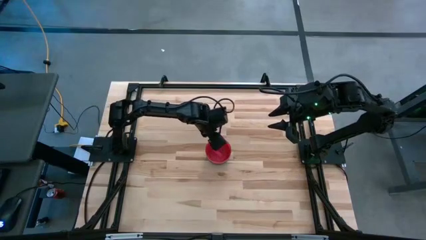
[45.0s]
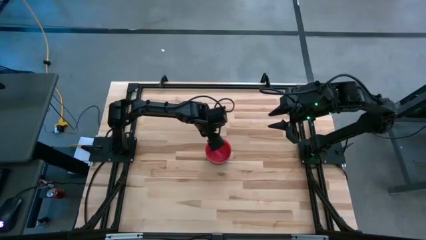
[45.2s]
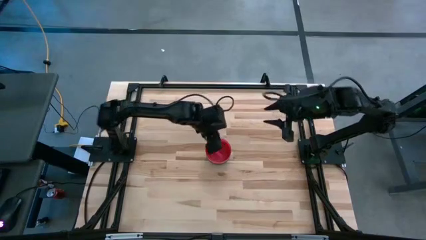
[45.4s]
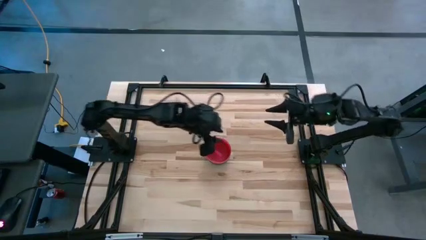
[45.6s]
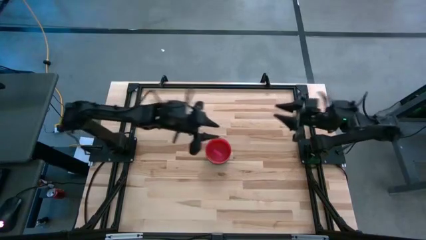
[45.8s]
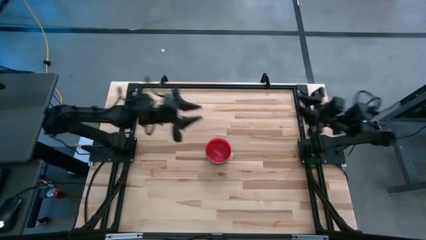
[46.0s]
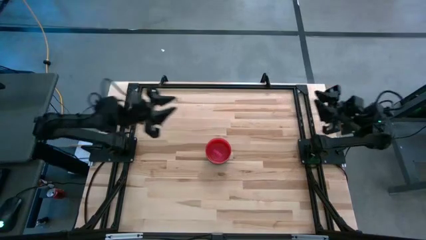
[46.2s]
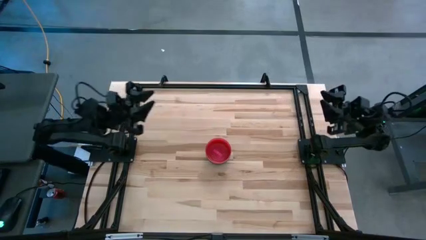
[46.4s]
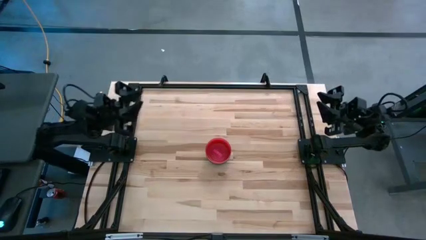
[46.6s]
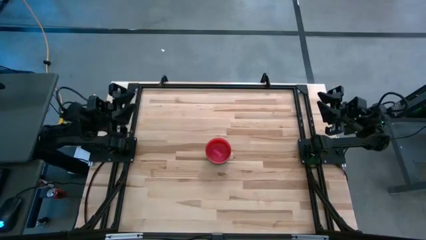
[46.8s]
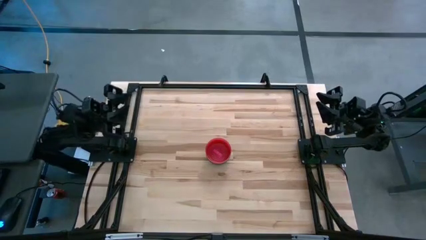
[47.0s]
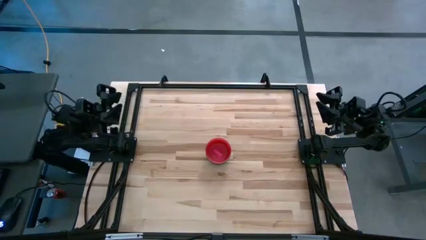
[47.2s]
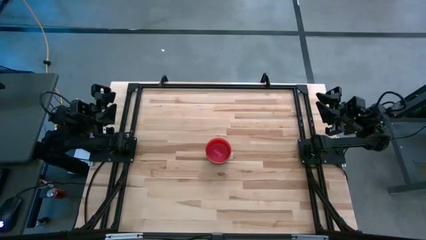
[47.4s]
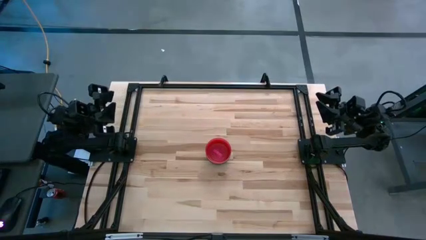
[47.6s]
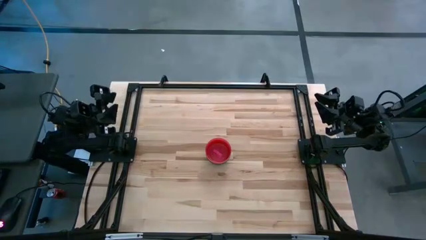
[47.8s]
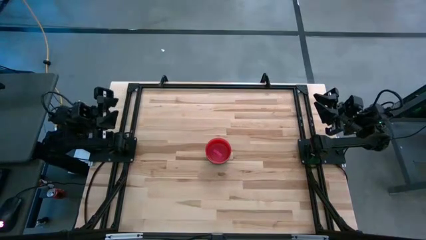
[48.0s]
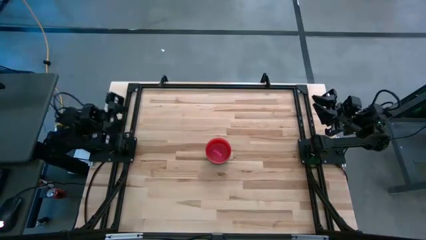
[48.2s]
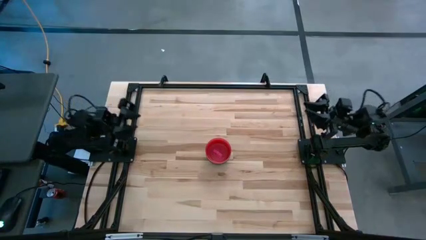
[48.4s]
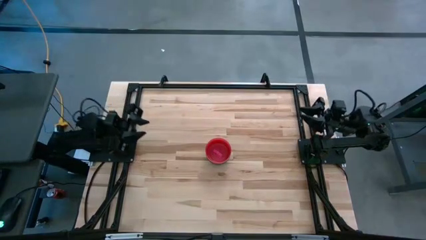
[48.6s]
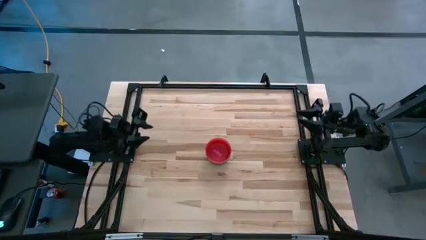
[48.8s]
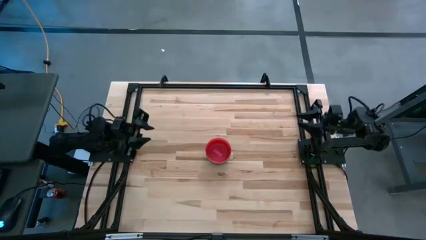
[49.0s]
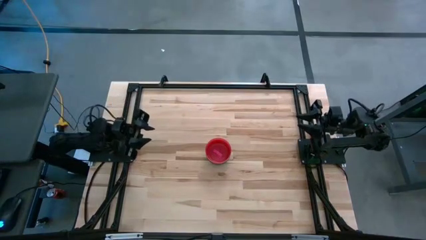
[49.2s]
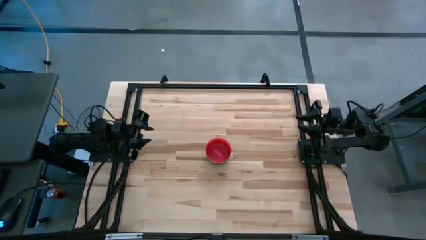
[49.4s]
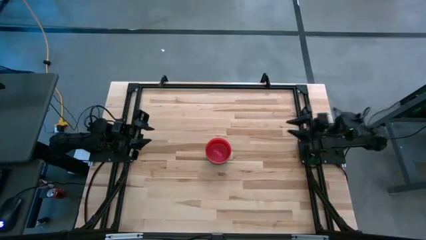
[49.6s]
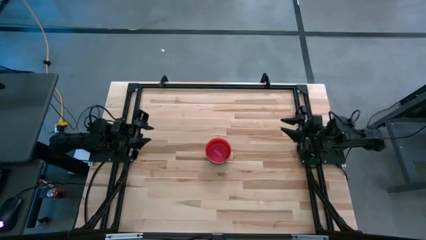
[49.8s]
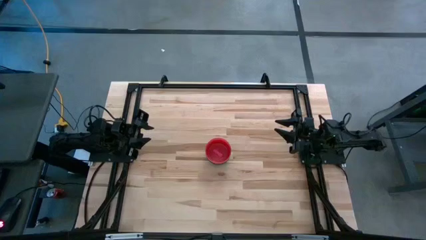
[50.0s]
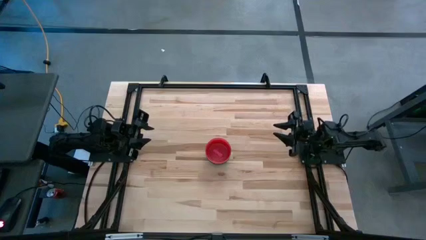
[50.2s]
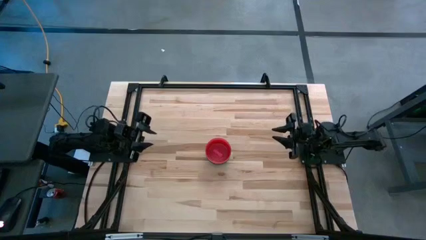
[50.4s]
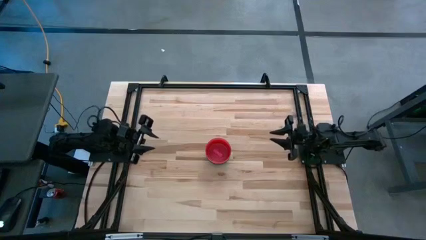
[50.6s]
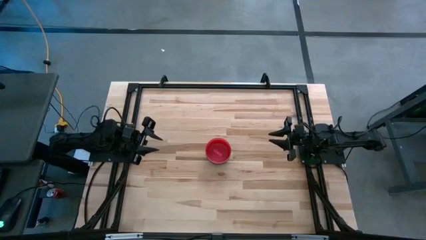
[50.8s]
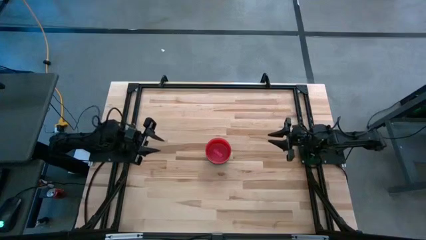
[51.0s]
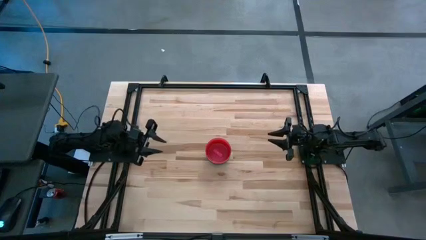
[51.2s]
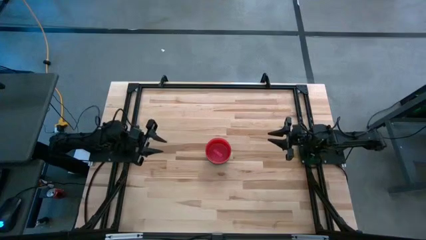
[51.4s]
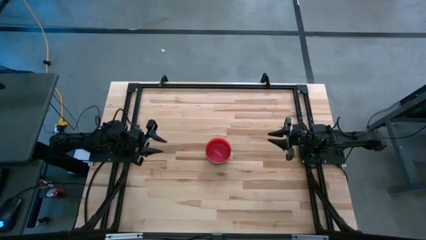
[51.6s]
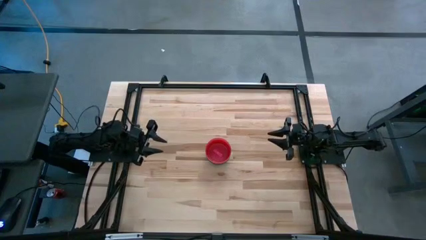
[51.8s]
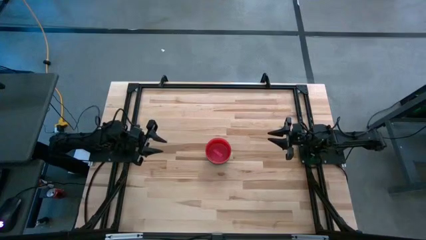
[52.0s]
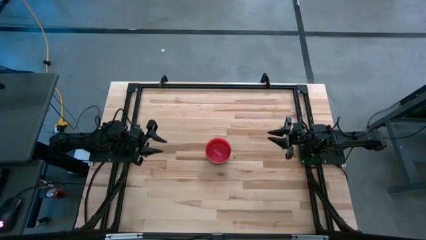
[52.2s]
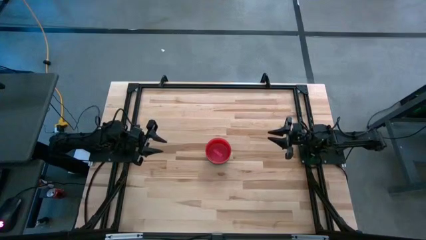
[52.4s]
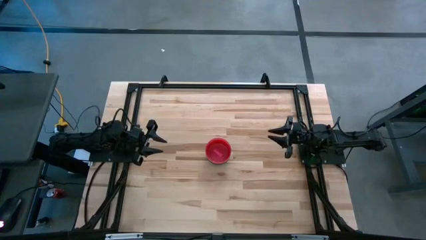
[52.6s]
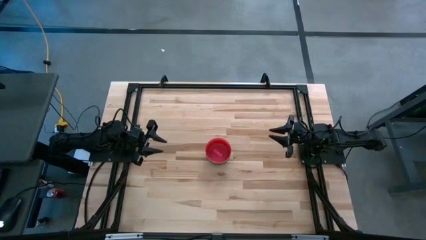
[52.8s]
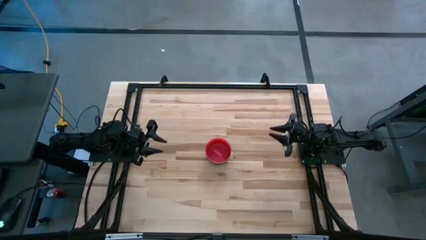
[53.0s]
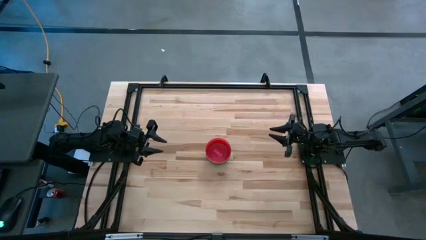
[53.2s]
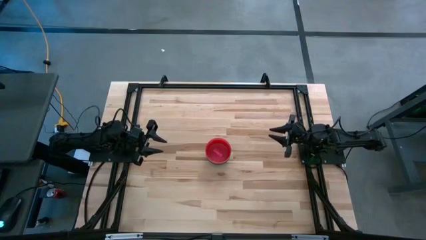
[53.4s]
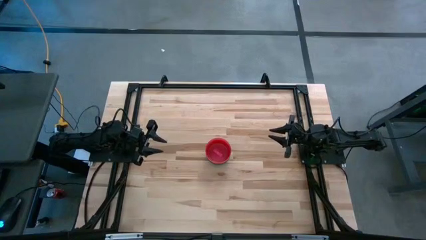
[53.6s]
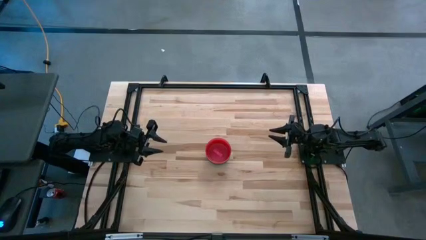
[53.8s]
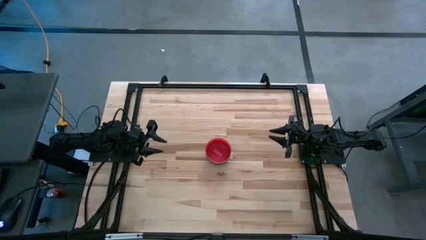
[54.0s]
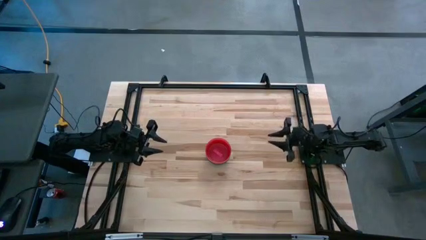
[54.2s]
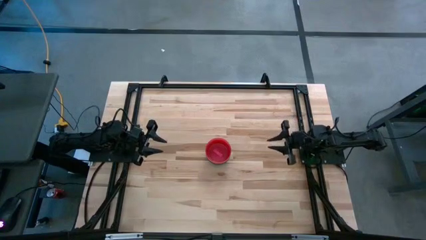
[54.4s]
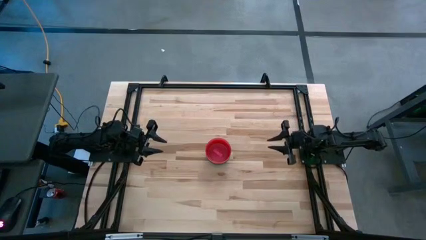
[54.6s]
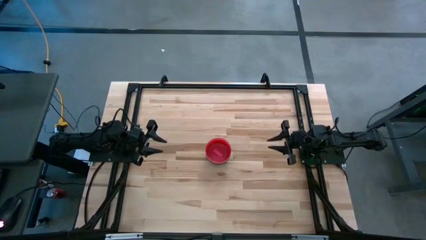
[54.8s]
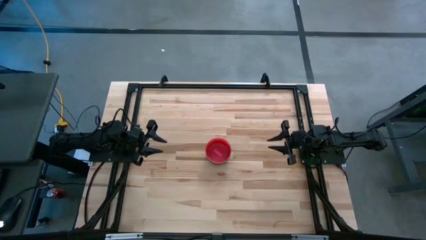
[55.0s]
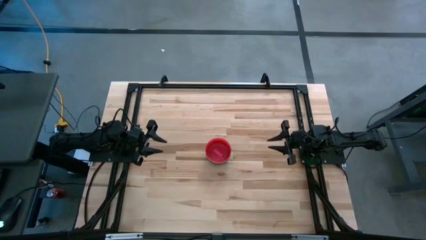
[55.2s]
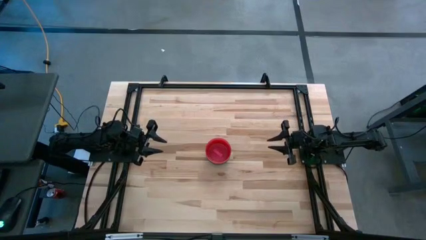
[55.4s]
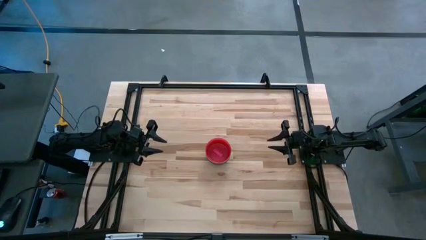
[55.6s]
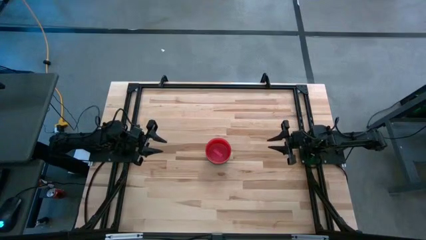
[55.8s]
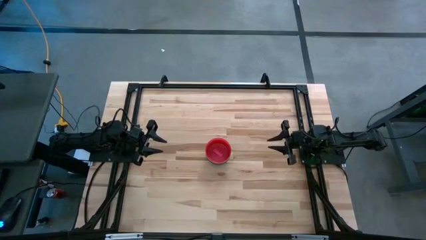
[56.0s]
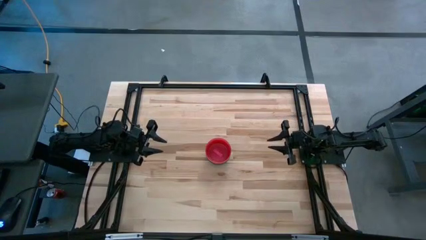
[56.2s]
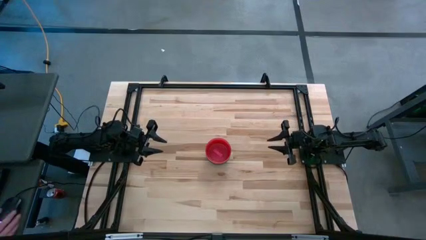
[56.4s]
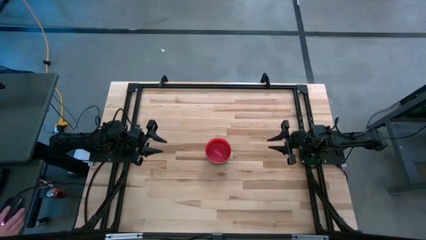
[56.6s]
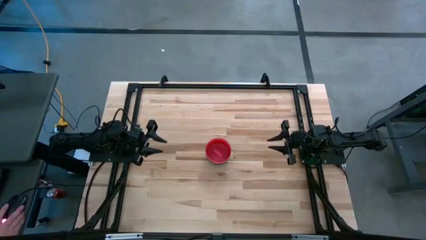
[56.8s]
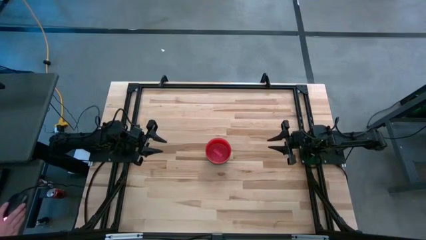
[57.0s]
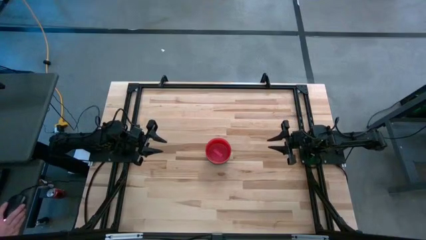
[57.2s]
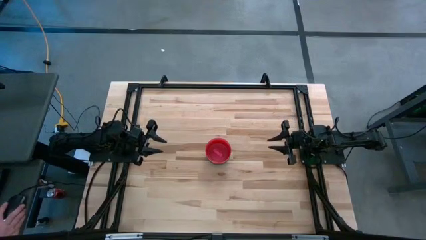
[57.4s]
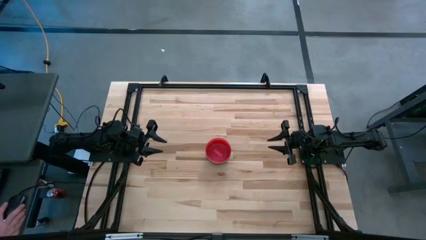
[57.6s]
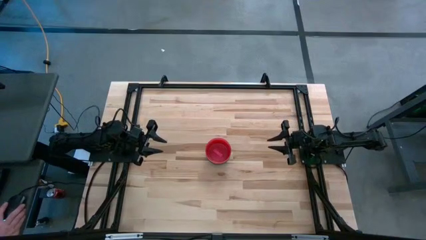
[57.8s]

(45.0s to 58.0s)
Task: Nest bowls inside each other
Return to Home Position

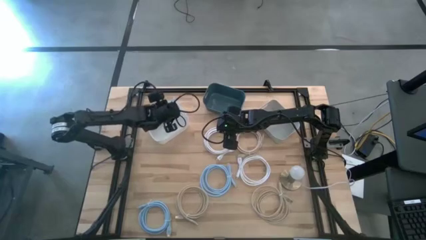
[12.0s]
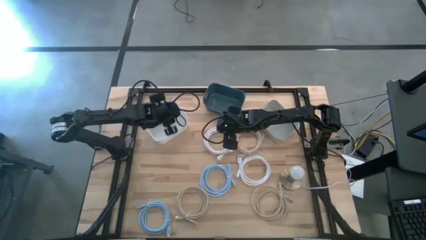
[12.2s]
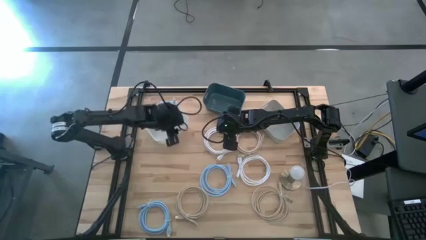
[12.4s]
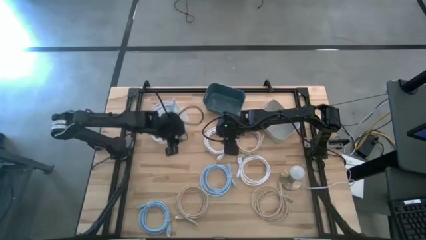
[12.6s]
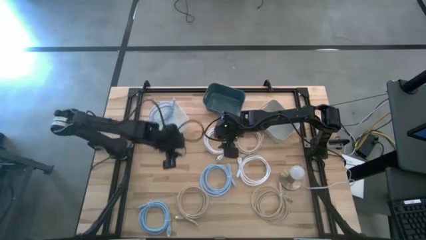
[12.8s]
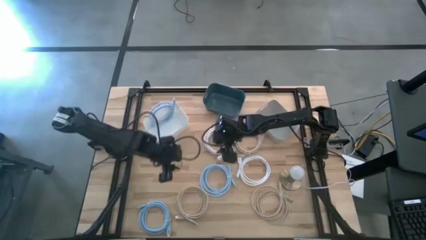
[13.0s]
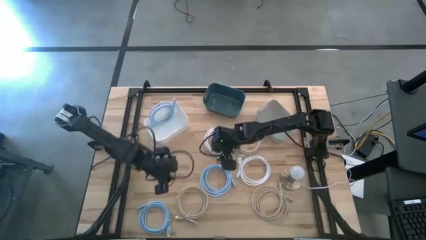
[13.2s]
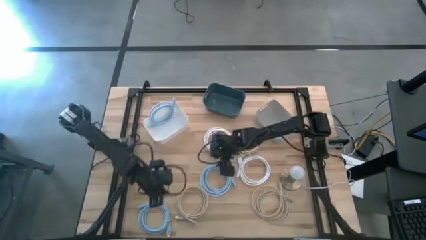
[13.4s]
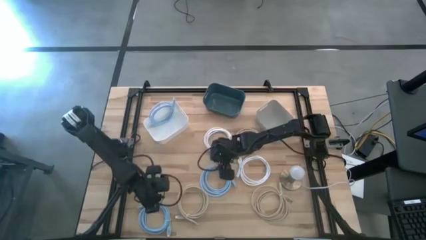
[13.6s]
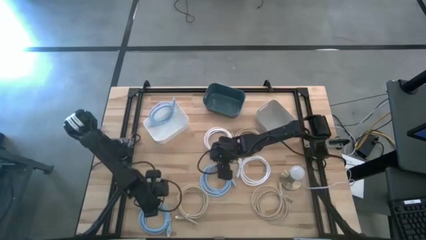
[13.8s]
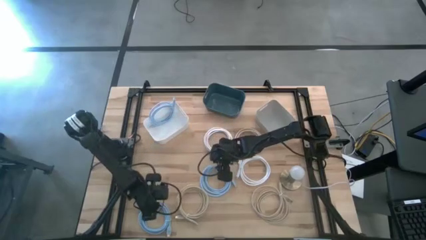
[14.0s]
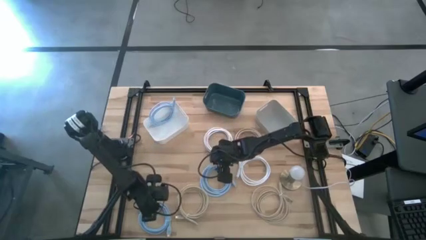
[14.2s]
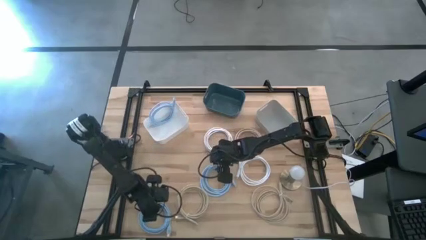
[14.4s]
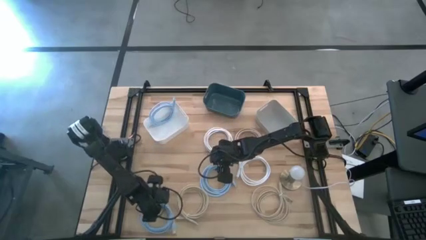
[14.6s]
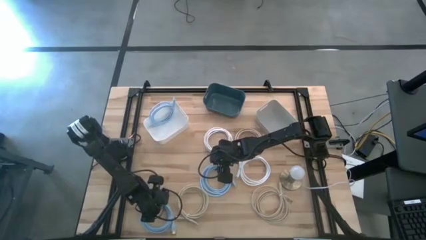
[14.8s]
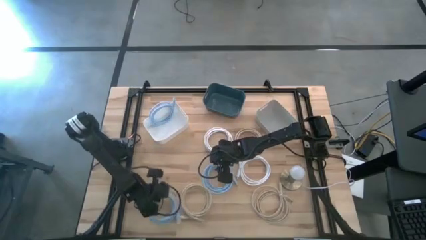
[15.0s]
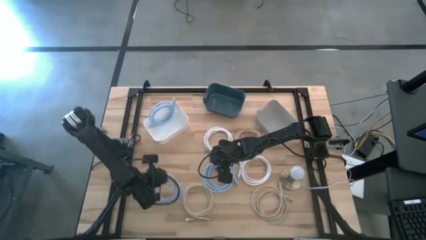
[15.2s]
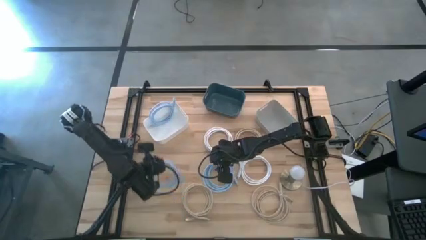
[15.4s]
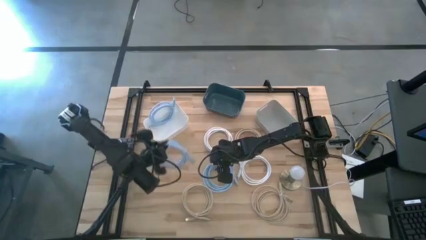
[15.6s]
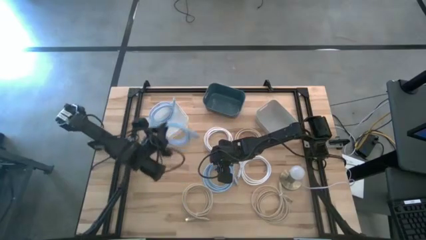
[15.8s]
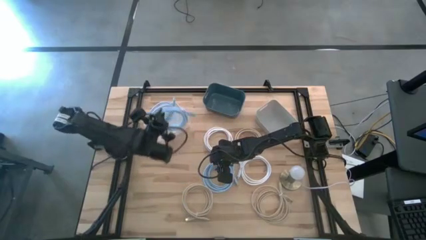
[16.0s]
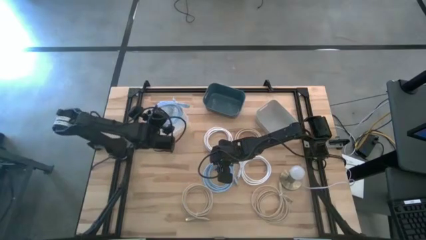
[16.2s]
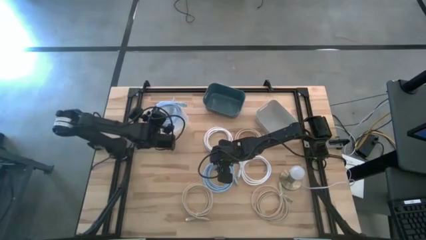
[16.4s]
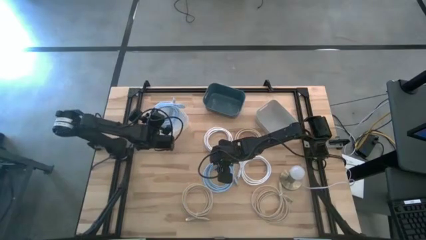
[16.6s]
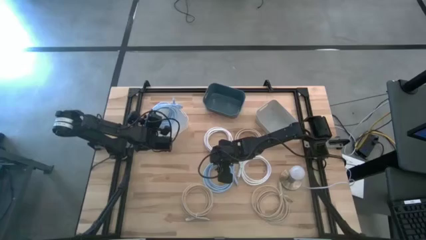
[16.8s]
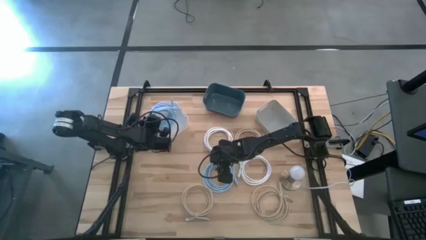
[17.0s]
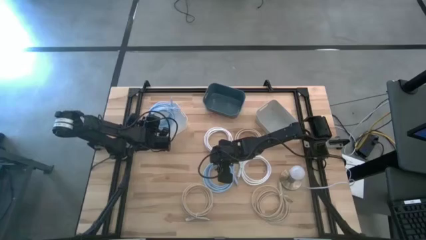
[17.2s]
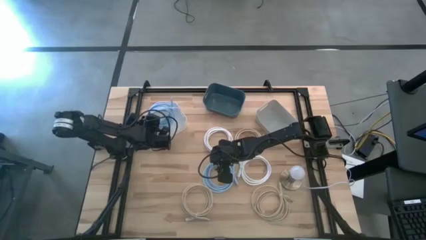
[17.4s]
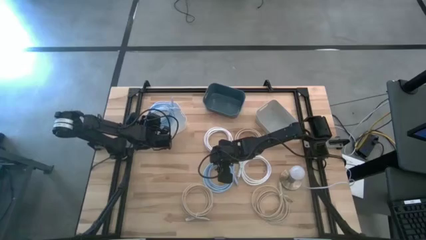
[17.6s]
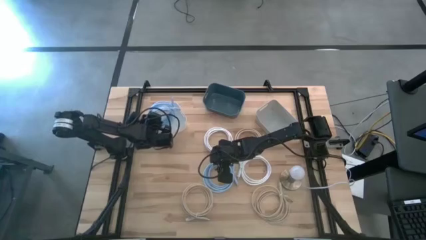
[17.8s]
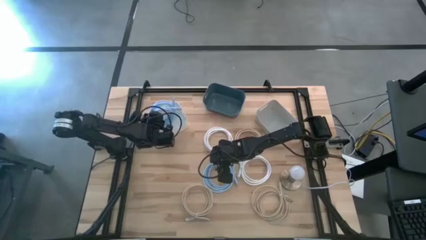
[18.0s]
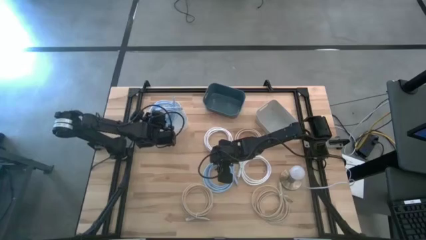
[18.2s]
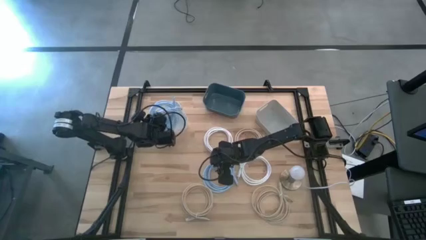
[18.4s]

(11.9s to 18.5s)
Task: Pick & Place USB Port
Put the bottom blue usb cable into the white bin
